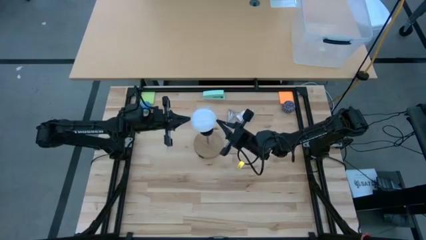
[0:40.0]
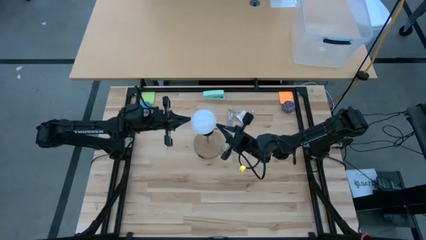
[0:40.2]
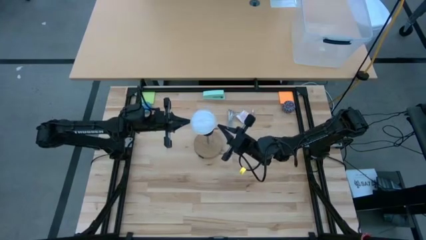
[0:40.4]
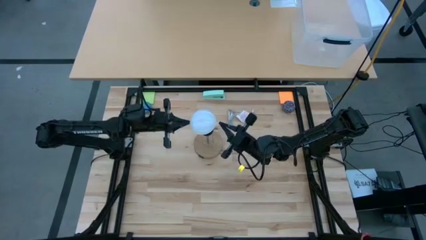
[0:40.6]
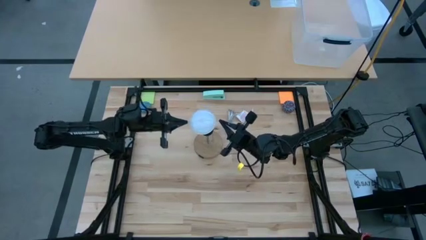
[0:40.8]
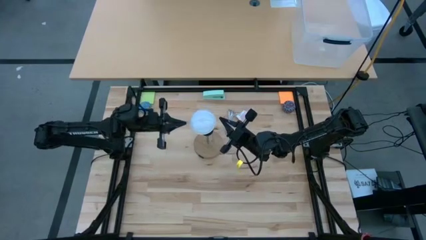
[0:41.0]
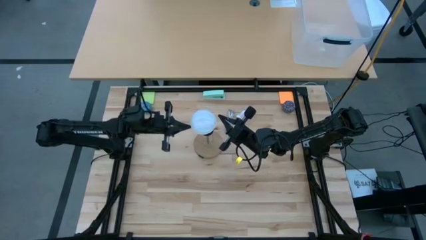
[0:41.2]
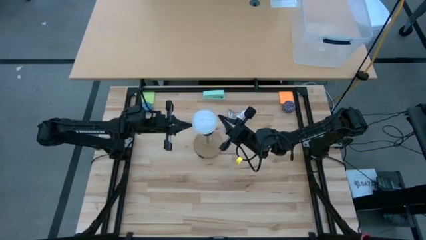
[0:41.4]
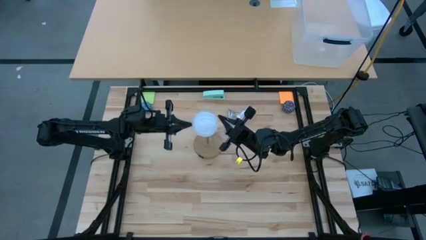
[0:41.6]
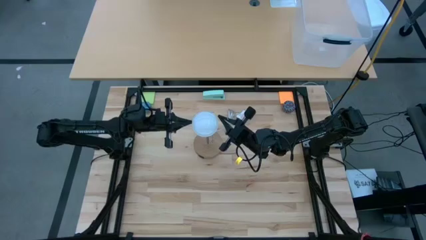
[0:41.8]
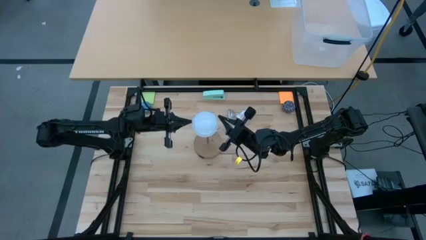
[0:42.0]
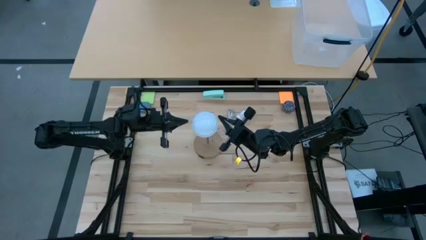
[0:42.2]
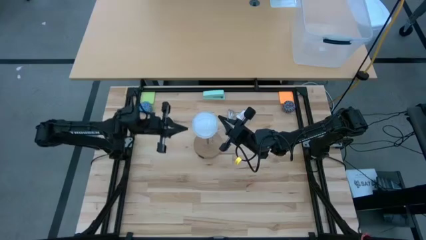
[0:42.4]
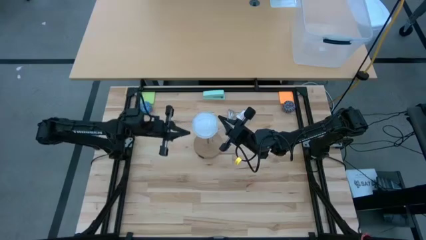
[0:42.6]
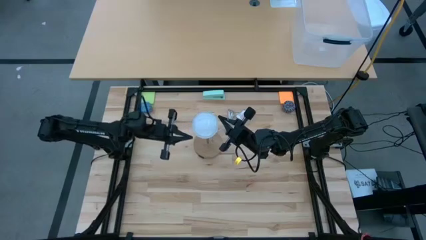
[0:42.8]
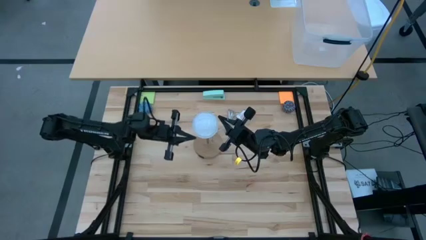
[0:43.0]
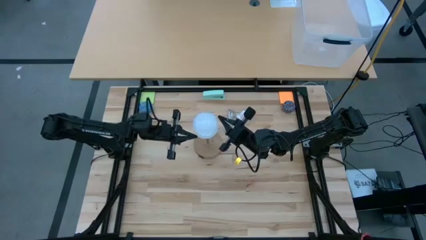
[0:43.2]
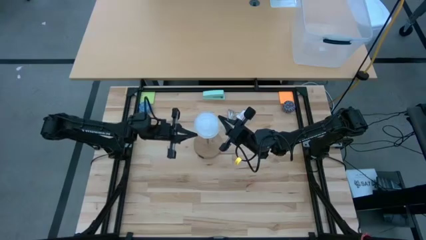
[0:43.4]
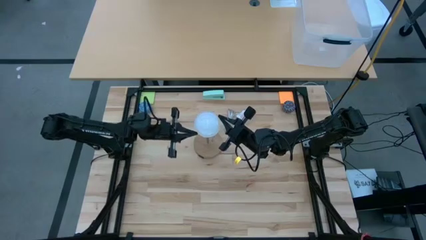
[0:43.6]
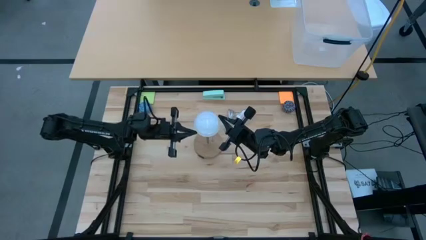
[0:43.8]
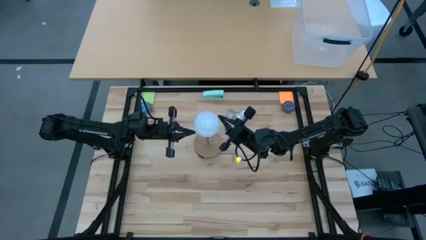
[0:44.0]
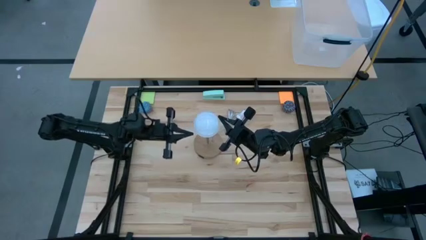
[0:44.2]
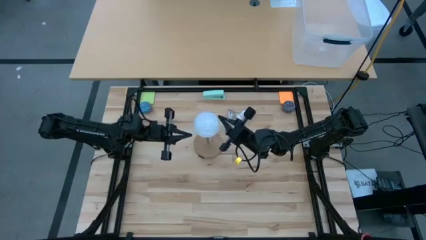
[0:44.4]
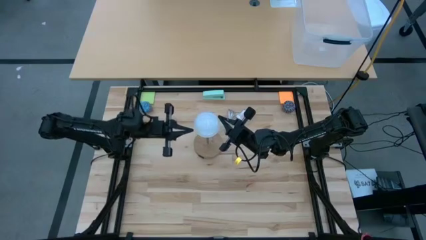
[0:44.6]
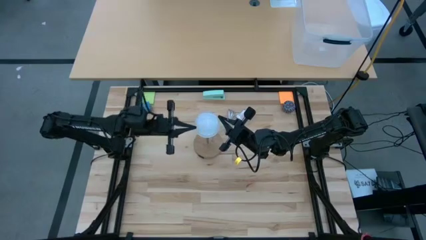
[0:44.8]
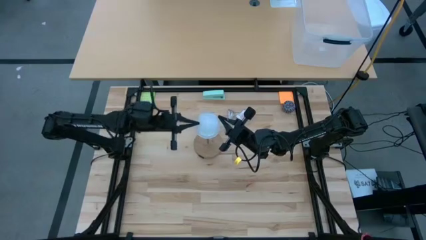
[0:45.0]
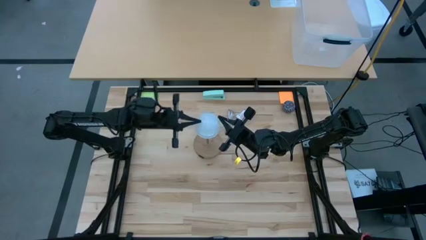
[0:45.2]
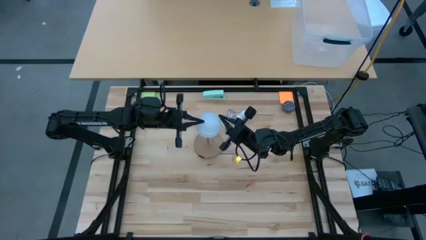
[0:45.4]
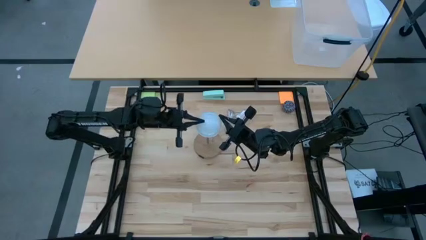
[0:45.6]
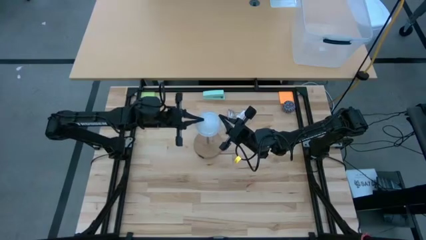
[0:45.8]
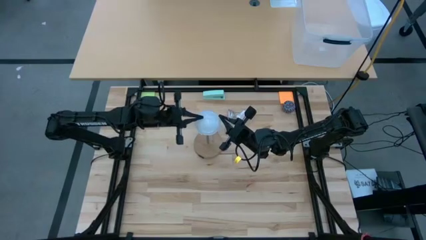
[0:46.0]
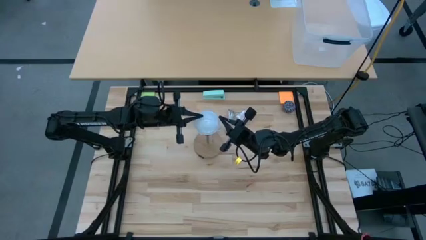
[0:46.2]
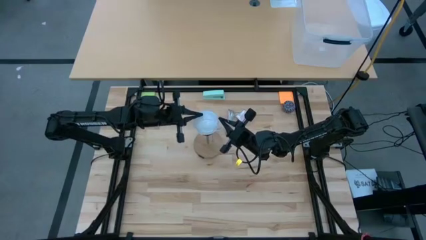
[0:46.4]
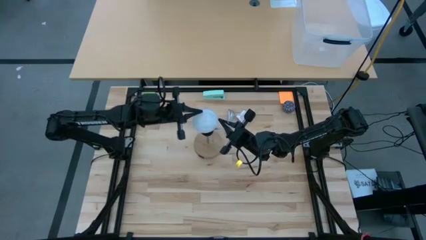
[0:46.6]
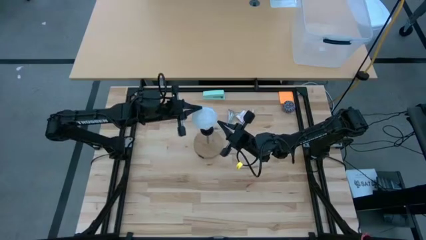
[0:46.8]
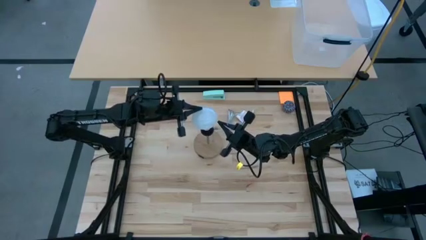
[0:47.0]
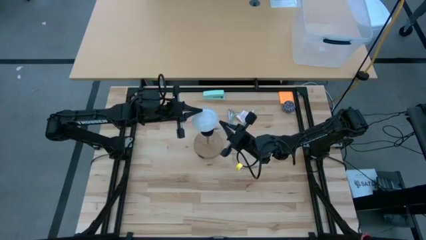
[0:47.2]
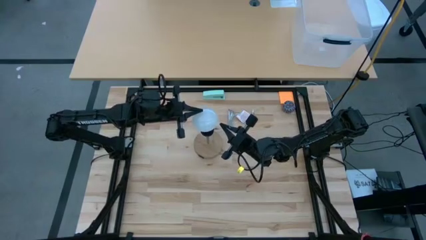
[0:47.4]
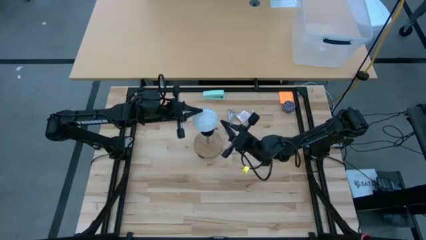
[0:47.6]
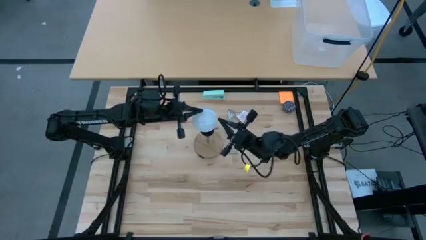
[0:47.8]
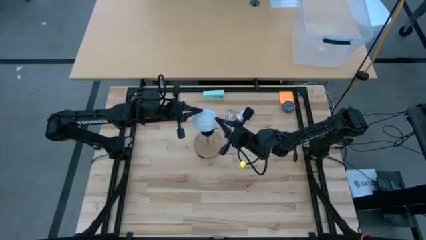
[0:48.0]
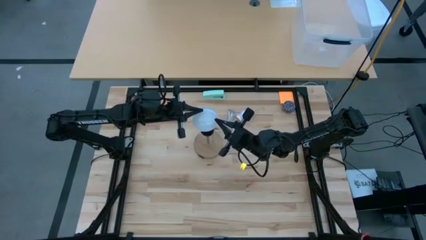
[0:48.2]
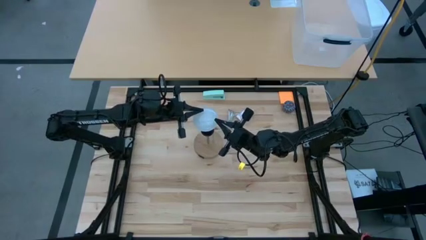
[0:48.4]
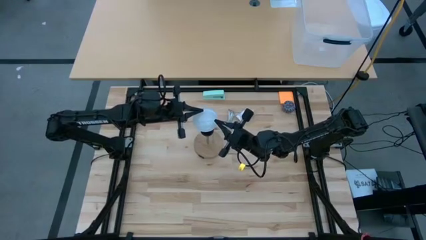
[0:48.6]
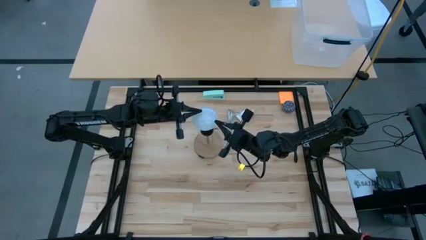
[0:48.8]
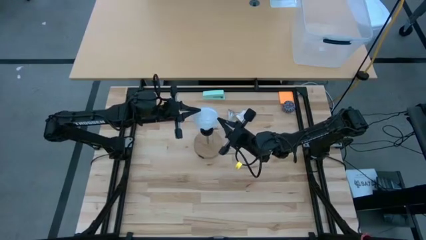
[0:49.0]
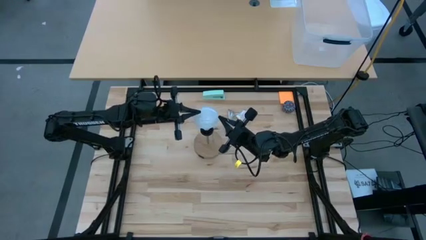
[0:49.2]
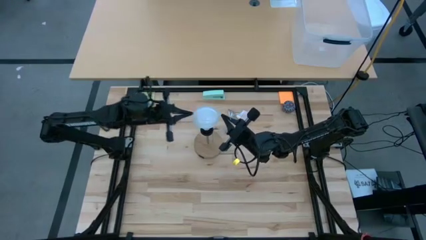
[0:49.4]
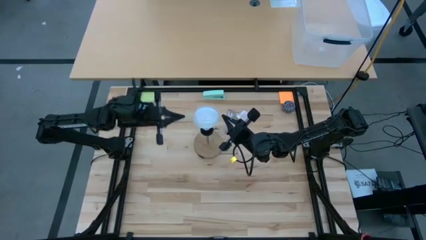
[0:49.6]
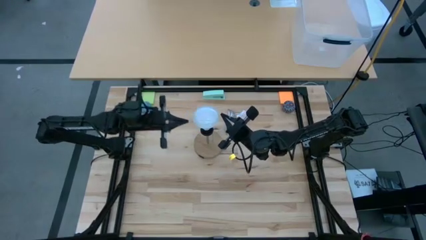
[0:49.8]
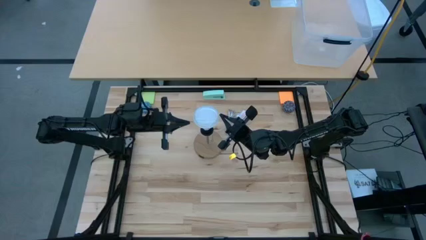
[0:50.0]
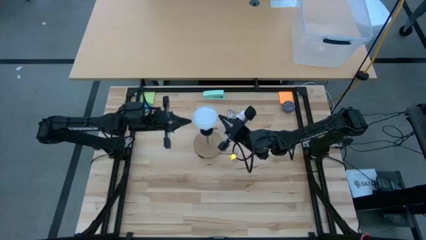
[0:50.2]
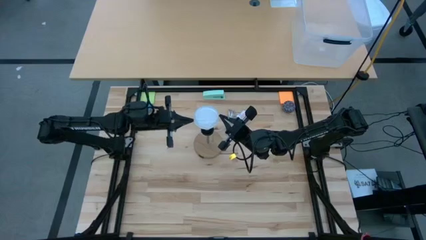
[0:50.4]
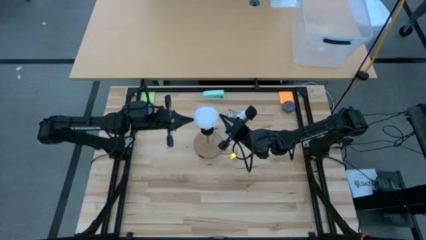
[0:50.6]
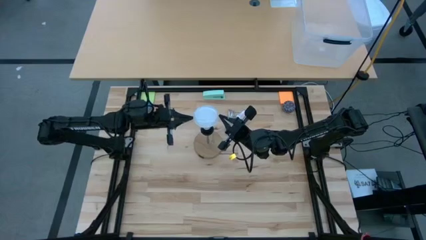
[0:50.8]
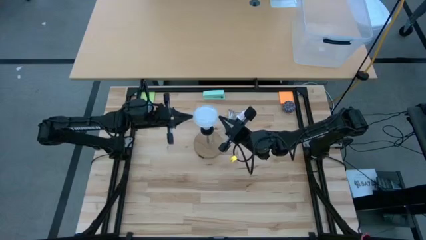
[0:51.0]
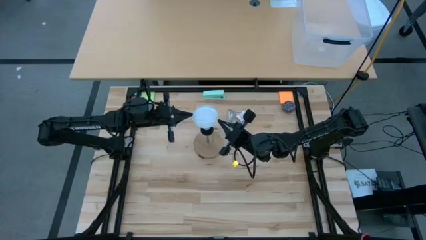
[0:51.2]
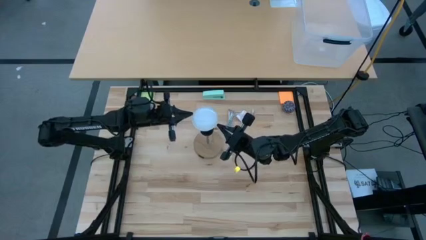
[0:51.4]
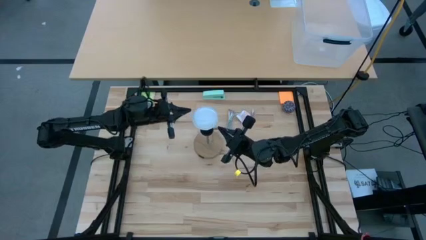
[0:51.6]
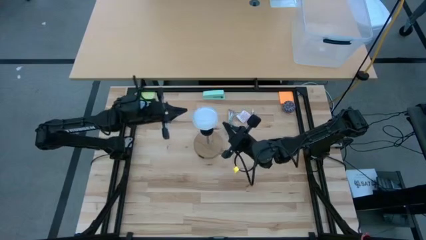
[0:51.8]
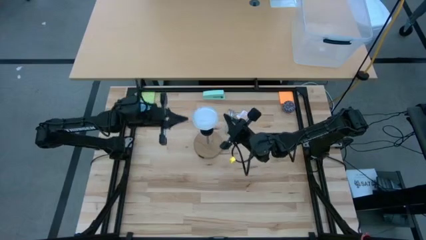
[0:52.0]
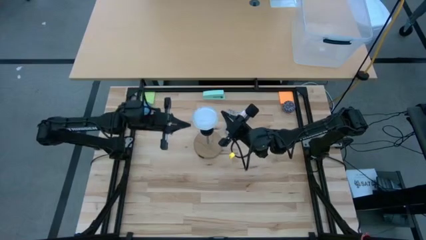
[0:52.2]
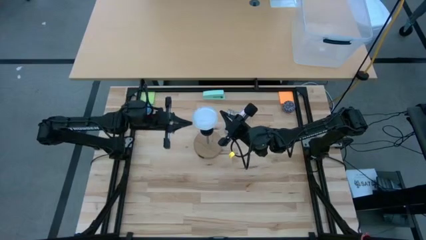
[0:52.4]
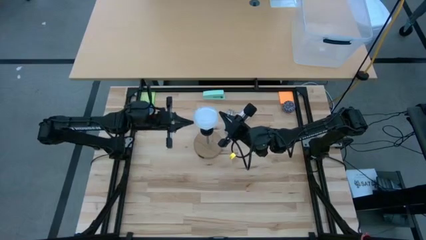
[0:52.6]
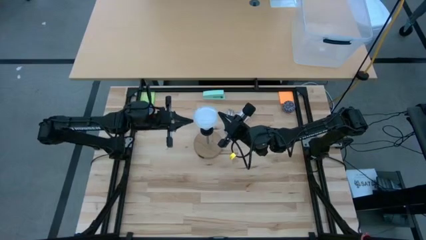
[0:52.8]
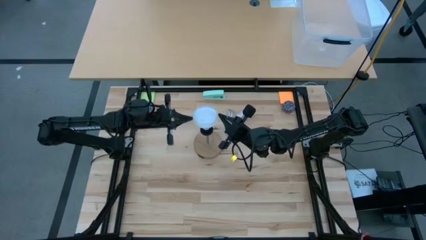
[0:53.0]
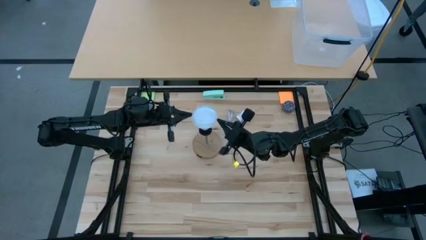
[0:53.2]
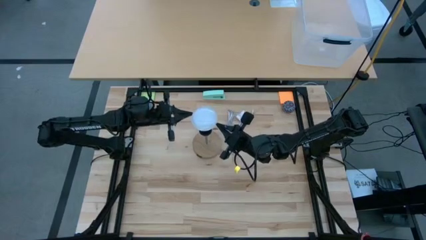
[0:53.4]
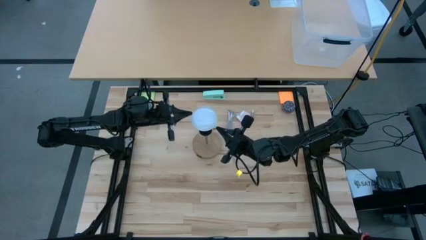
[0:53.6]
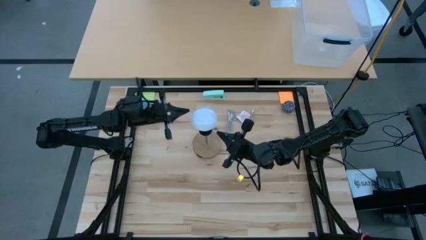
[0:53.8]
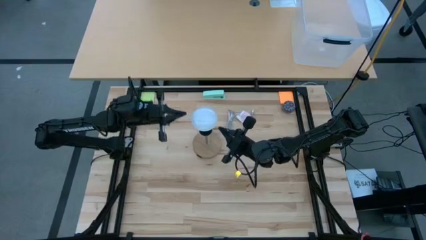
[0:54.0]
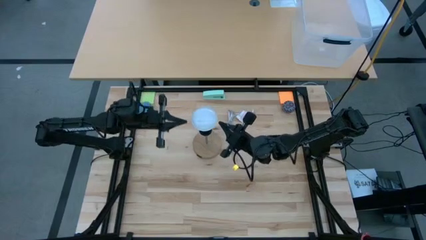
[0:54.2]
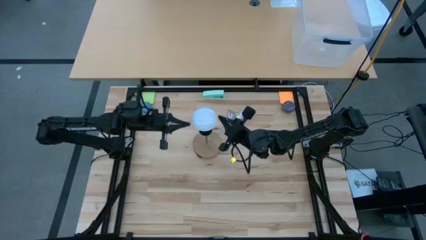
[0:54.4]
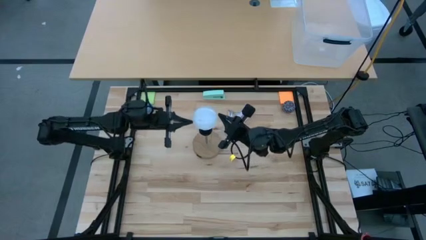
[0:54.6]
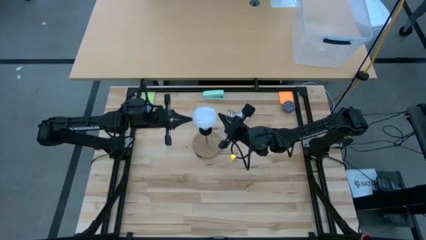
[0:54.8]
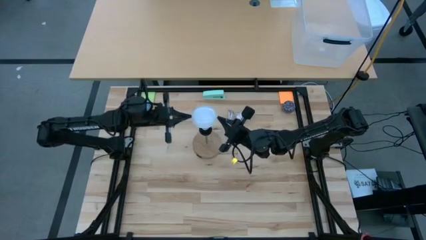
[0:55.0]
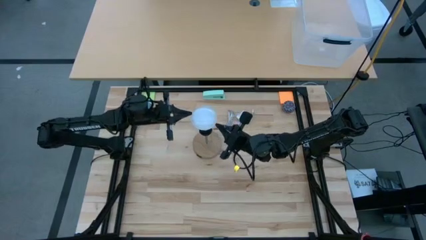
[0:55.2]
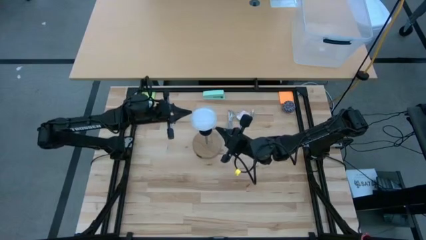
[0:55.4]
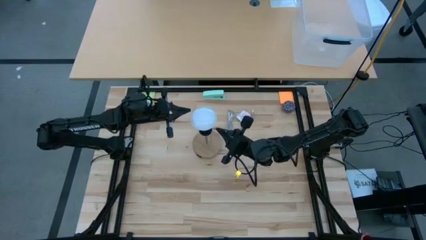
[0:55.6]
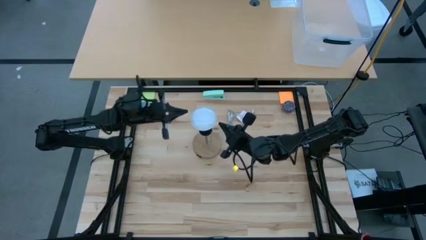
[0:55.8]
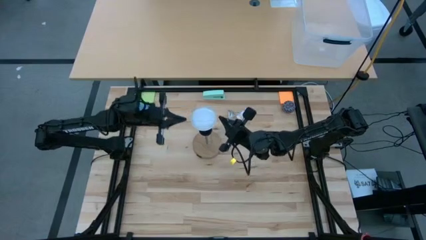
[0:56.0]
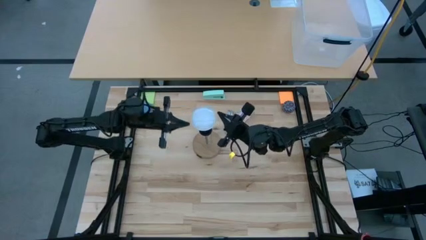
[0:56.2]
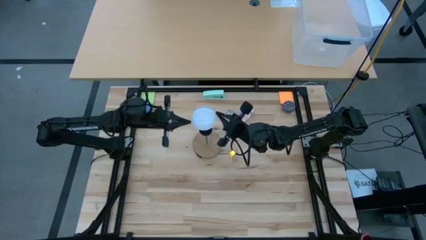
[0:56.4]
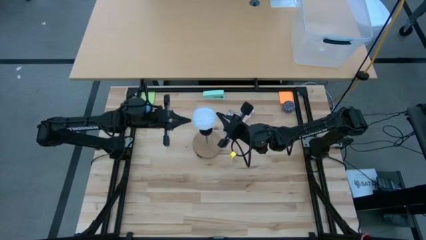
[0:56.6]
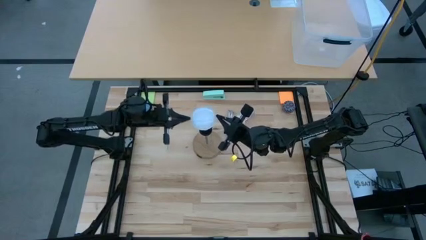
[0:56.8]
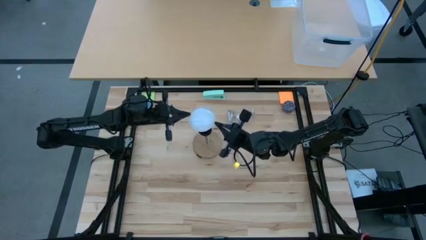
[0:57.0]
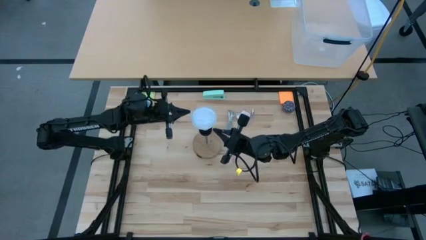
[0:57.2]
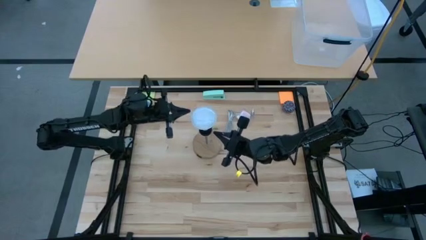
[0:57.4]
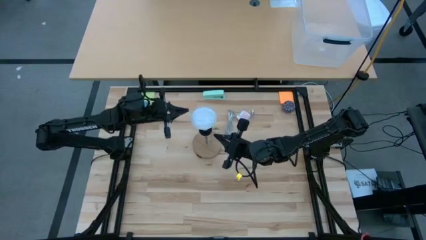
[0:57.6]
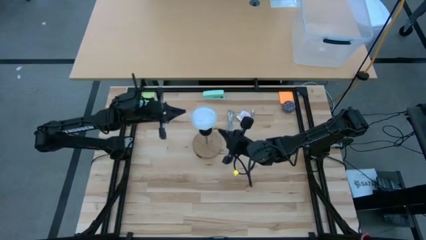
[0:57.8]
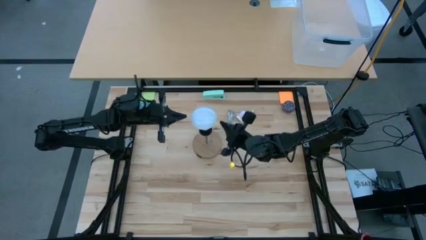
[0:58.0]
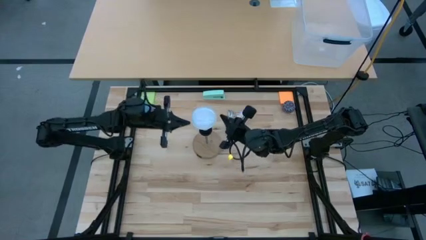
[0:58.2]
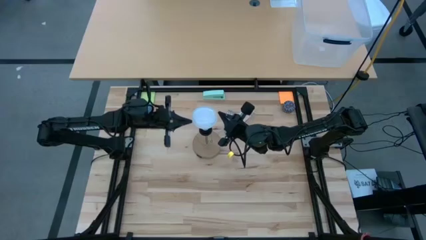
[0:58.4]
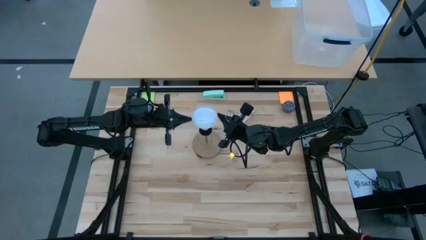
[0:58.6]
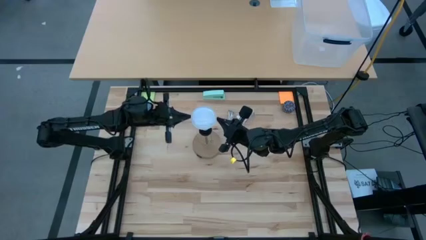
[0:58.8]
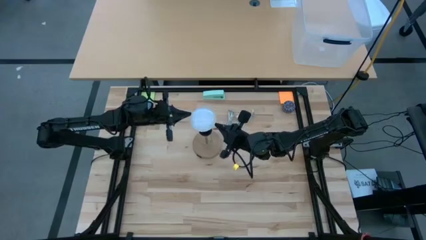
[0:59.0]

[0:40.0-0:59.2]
Task: Screw lightbulb
Insert the lightbulb into the lamp socket
